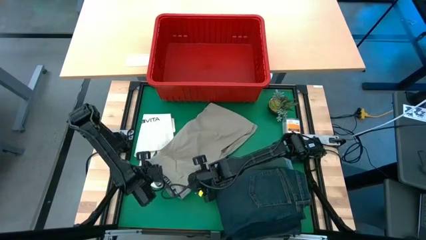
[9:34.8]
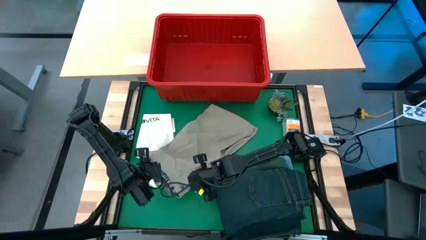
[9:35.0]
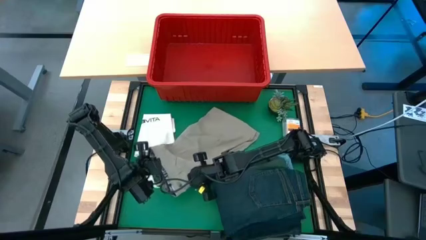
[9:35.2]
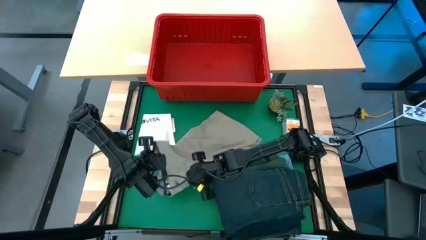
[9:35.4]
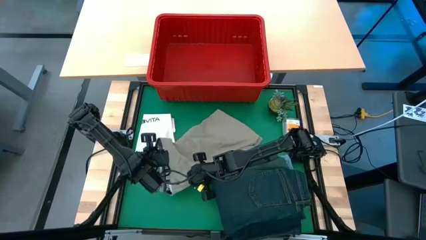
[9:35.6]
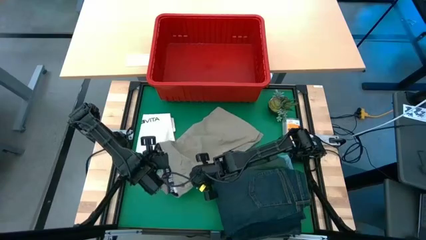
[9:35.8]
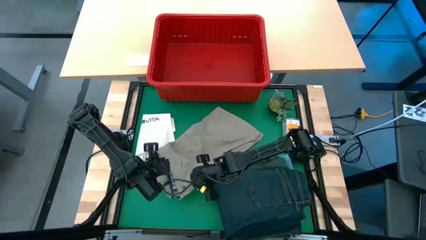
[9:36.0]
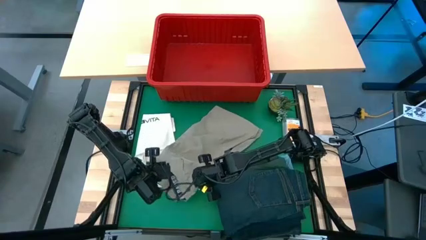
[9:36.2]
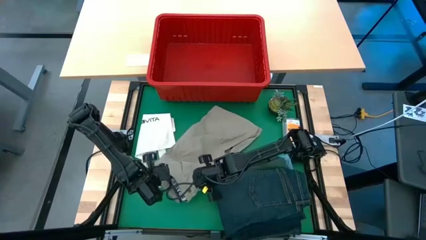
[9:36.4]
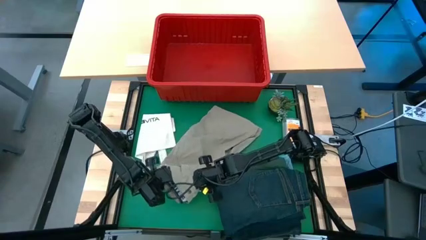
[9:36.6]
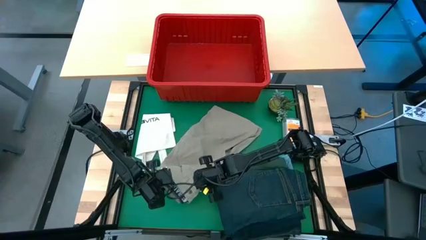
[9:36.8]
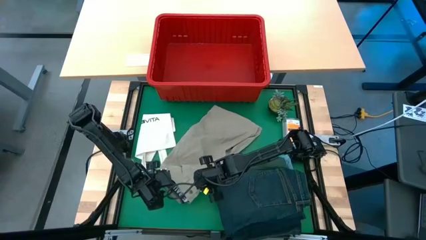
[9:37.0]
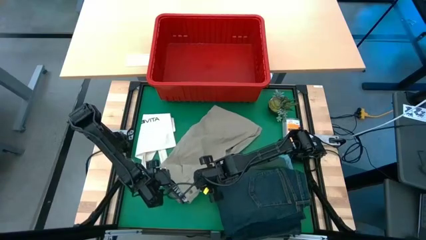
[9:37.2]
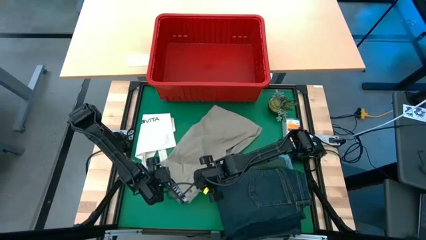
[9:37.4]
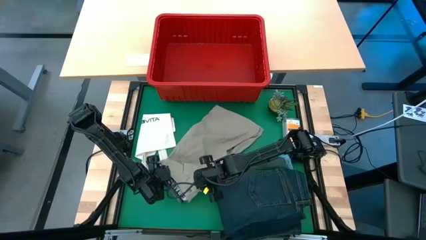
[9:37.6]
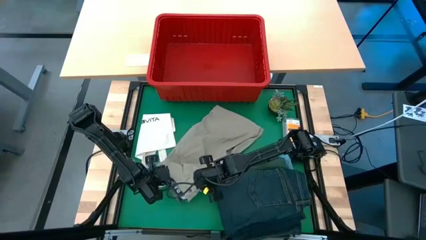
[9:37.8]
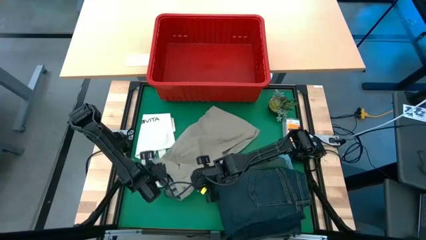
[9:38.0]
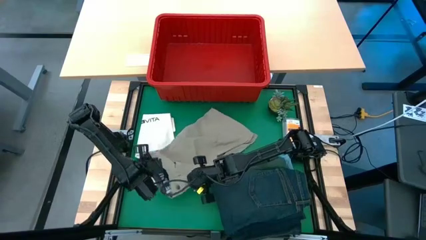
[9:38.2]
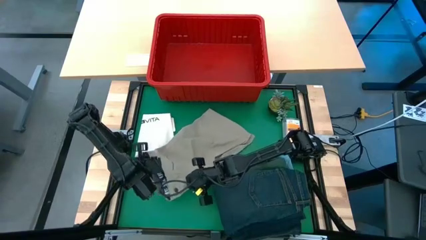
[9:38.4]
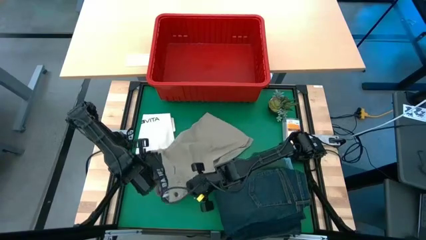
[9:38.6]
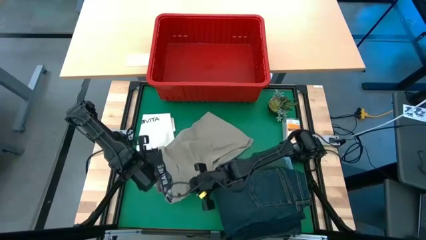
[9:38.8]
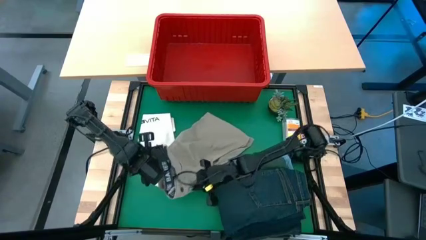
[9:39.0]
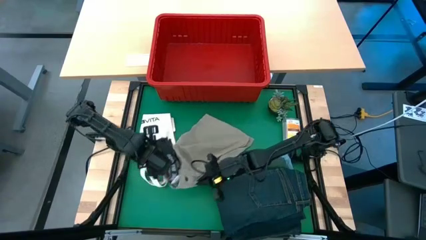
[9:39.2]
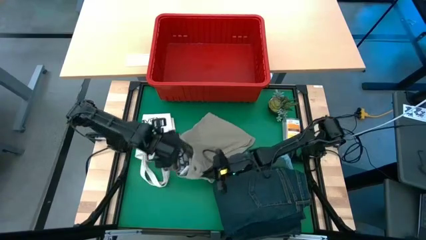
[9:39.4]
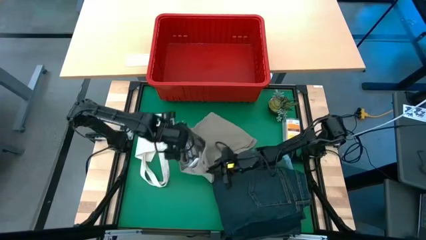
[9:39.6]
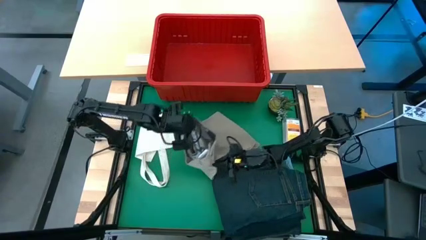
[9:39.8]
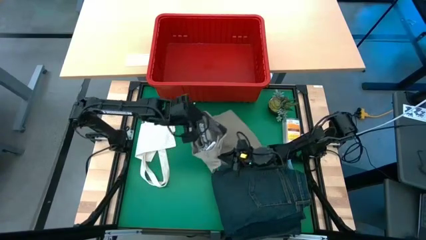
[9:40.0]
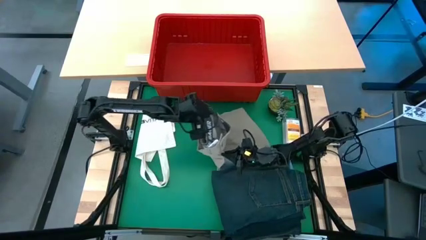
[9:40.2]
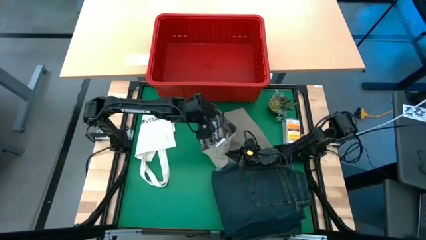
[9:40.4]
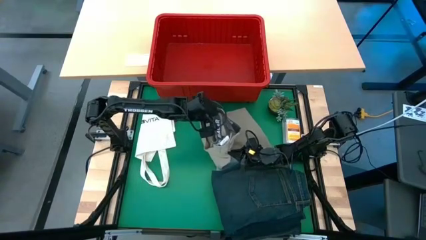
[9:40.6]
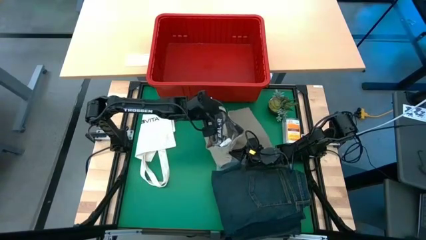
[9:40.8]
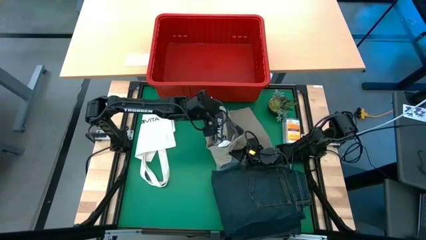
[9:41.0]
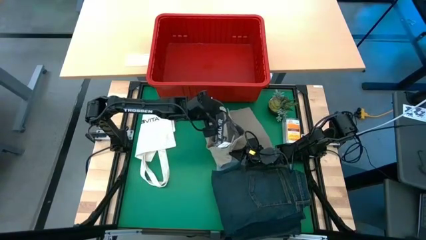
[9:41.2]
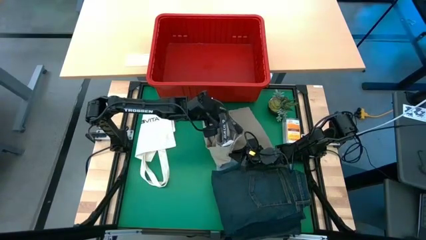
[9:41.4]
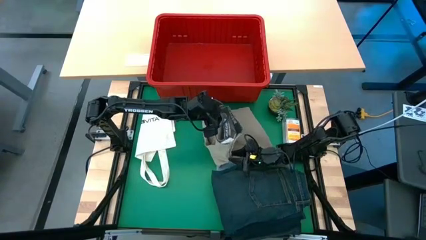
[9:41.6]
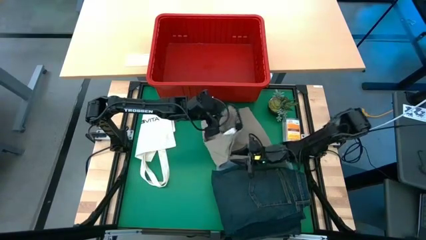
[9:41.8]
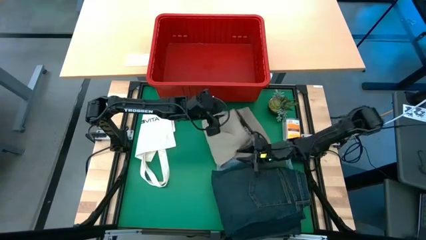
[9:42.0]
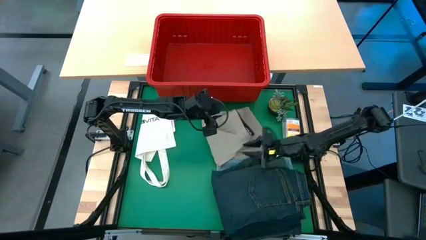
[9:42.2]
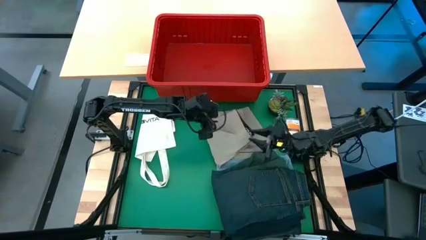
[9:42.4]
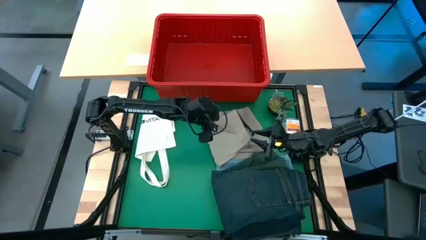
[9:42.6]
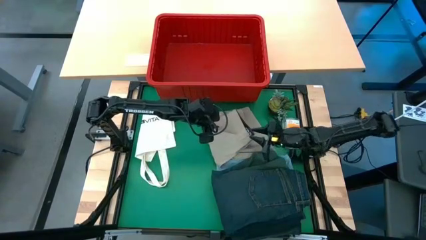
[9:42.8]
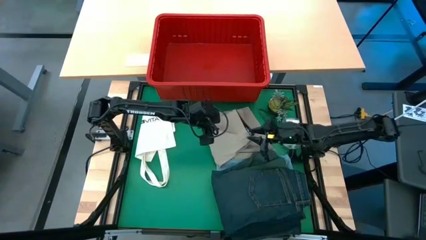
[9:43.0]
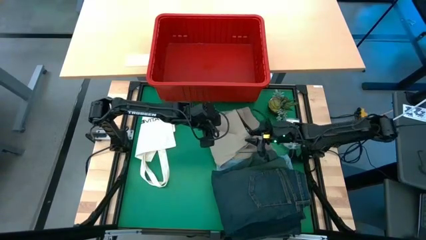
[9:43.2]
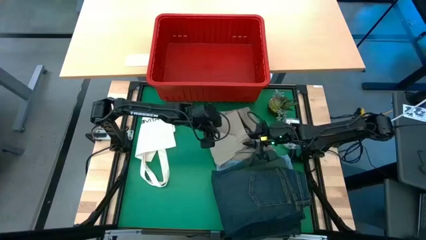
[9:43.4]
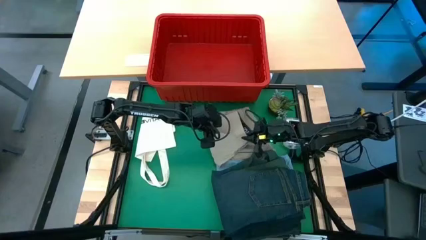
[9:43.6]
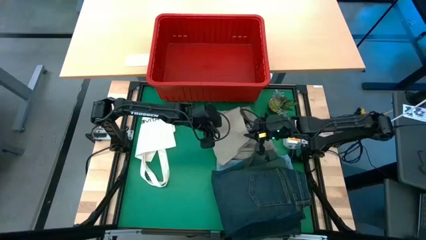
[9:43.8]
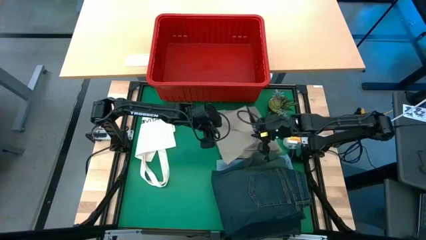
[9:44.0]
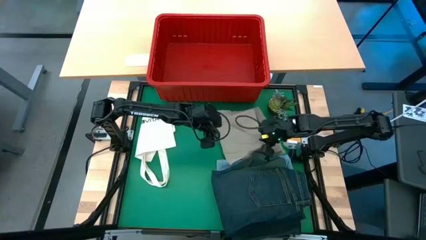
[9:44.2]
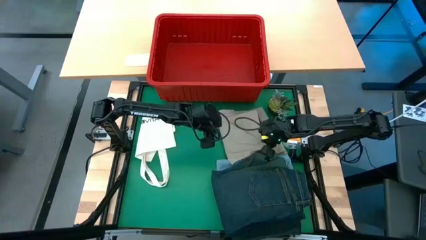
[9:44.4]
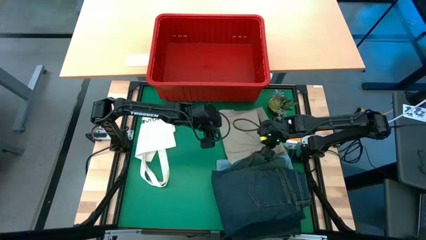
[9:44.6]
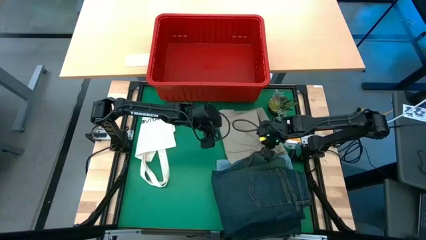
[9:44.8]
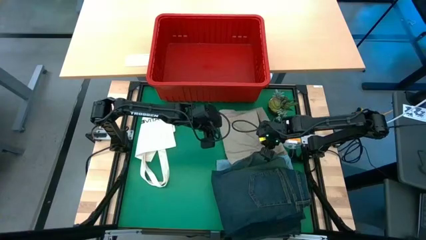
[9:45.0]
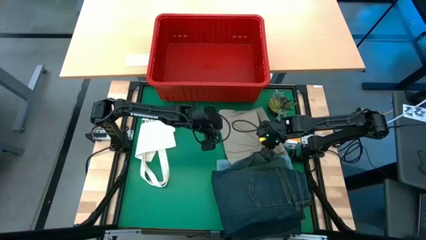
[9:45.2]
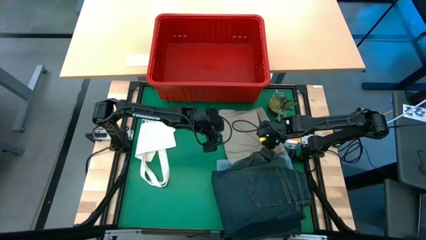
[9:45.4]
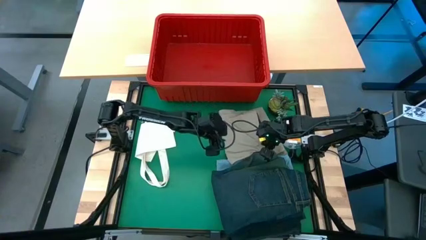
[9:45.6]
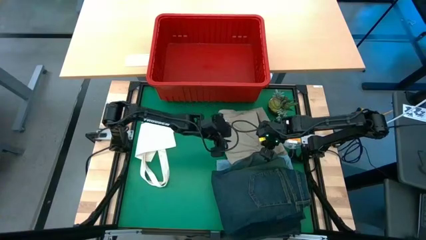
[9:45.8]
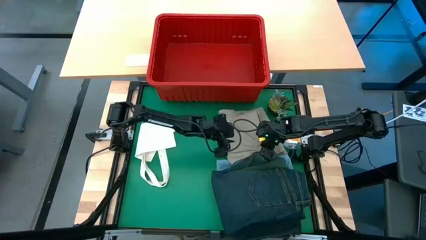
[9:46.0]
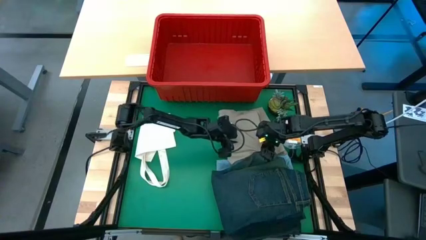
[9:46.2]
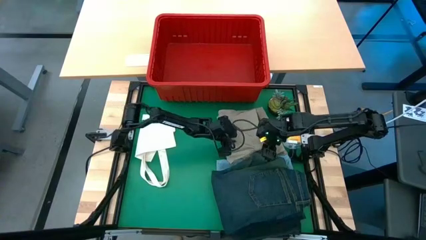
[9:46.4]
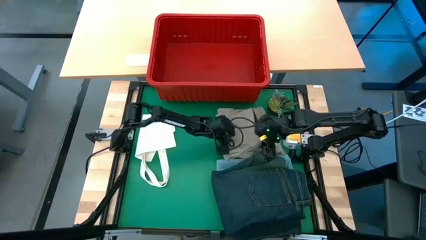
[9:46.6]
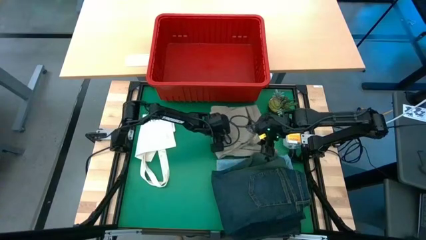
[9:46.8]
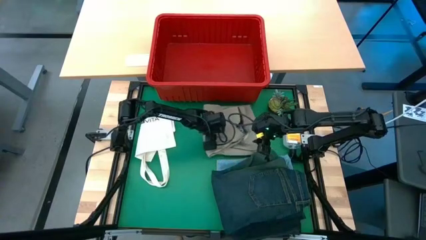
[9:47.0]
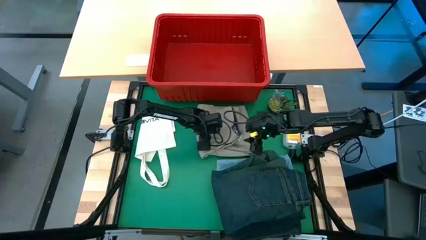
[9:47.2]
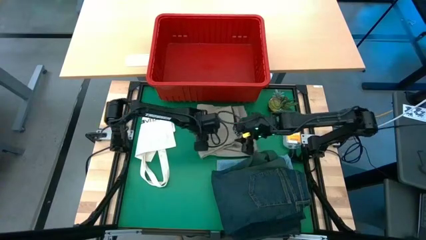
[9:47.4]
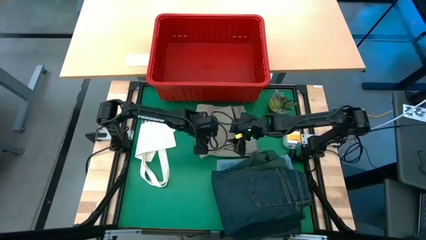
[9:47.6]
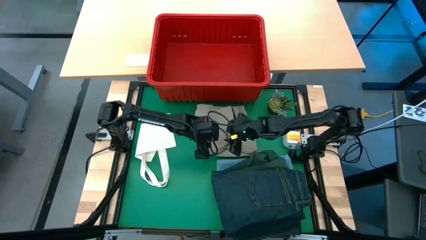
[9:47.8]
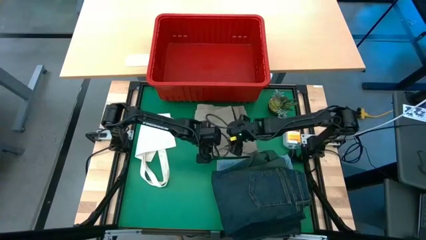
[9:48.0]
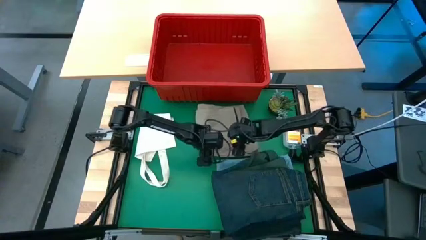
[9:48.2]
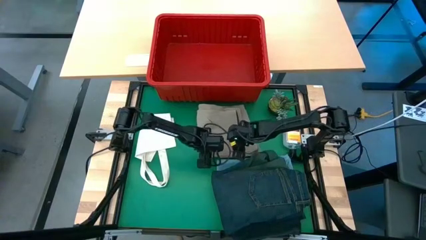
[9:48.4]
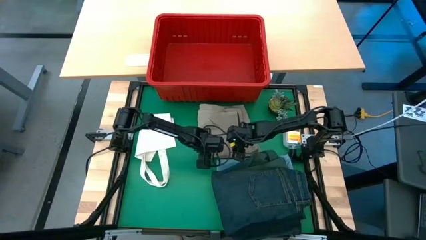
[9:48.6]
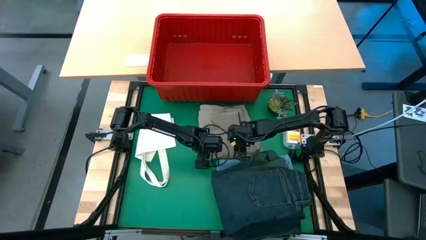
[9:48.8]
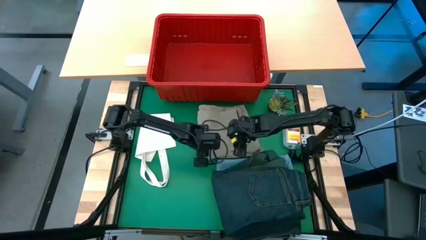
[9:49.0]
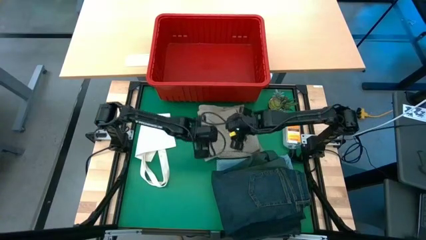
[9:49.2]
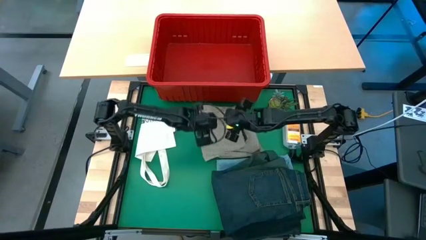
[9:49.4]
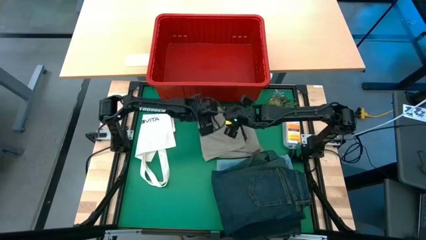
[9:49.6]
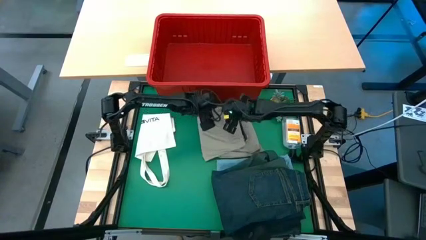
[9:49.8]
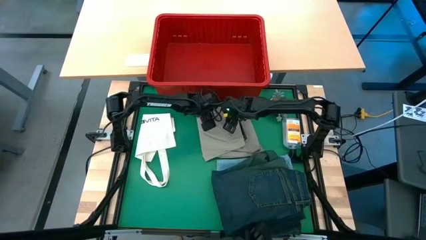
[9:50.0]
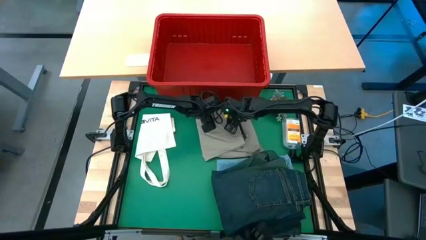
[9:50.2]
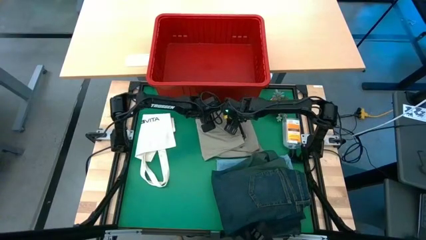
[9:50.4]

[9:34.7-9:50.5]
Task: Fold Laundry from Bin
Fold the brown shorts
